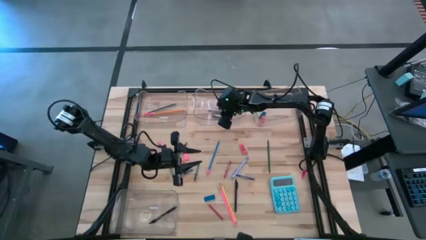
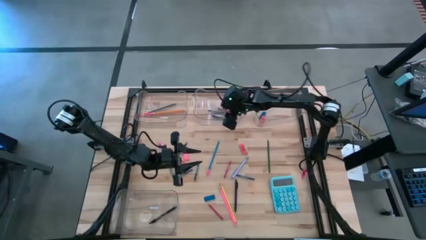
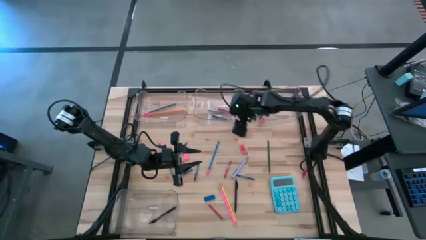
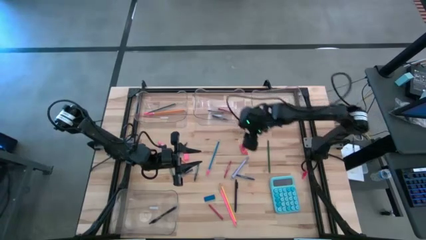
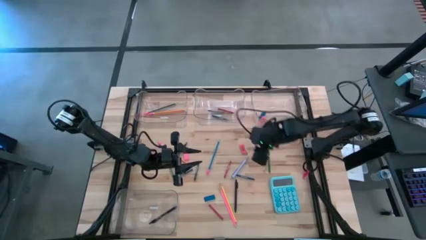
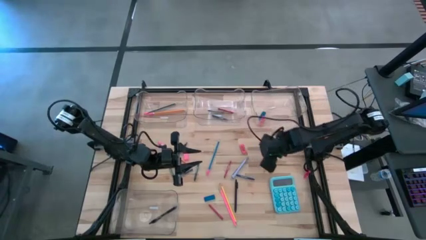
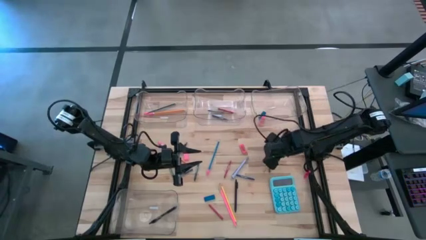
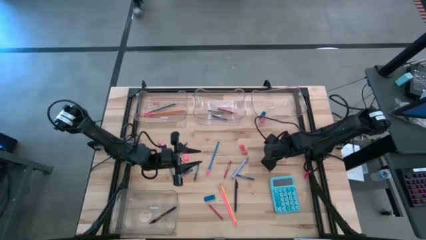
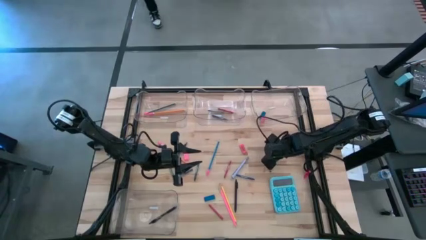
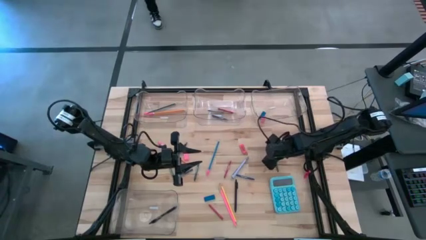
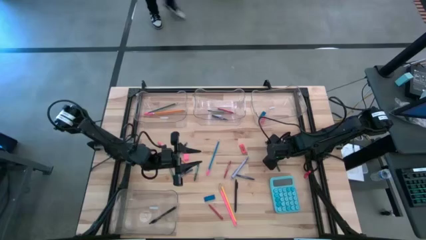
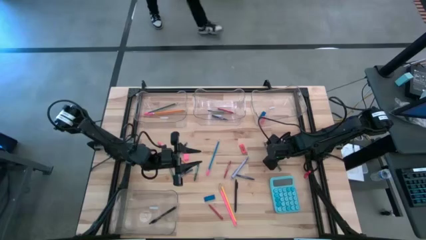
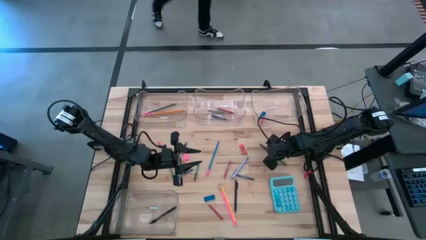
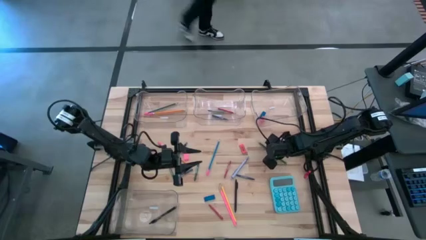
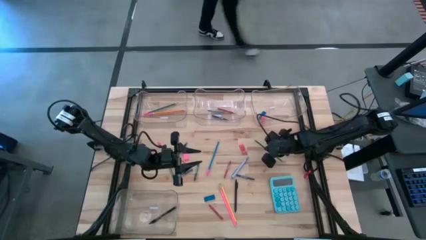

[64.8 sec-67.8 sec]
Task: Sort crayons/erasers/pens/pencils in bins
Put the green colored pencil into the top left transparent bin

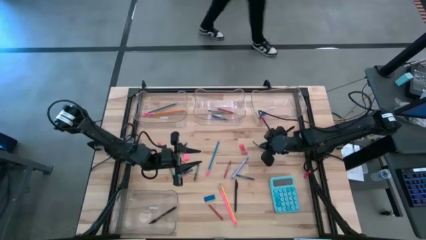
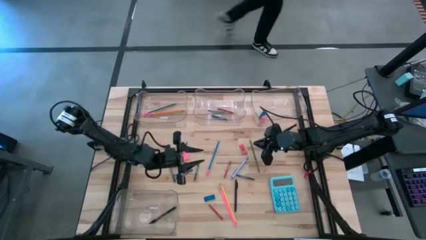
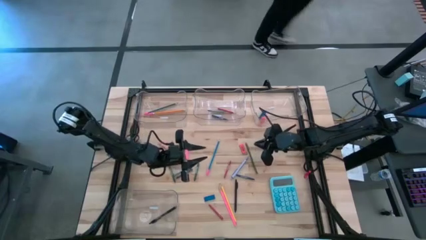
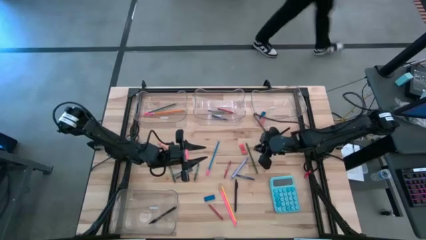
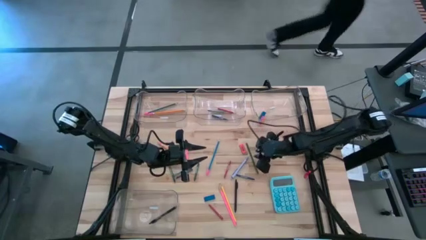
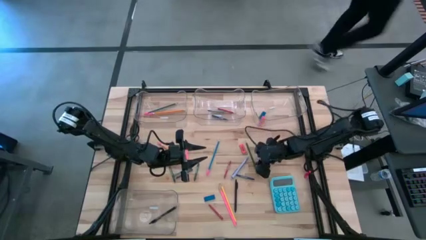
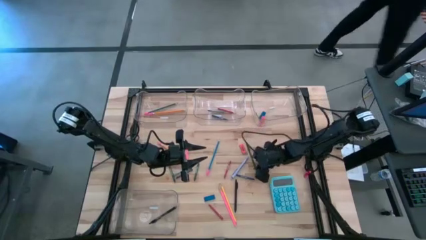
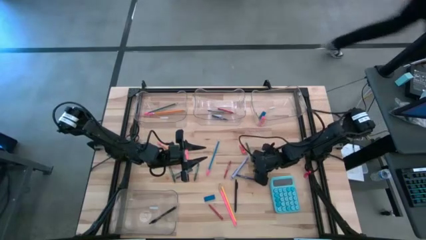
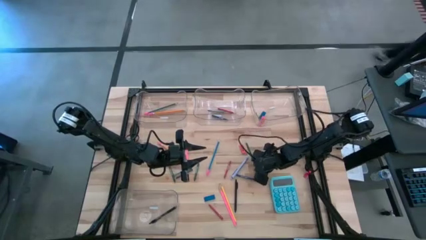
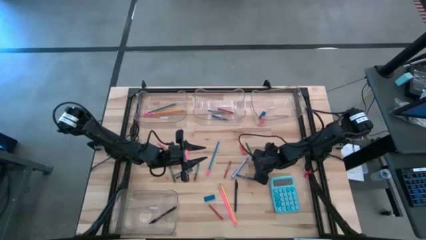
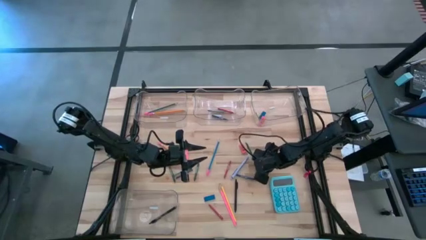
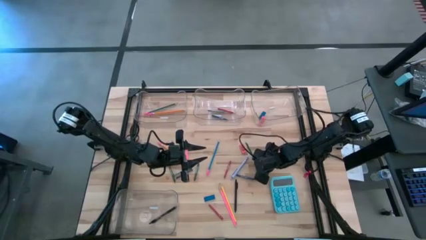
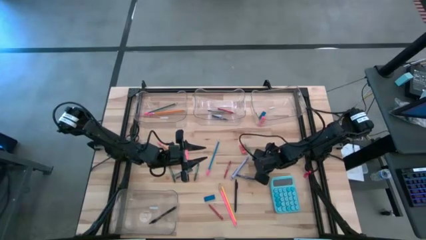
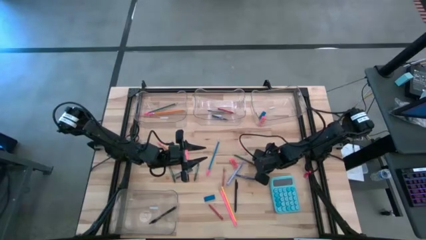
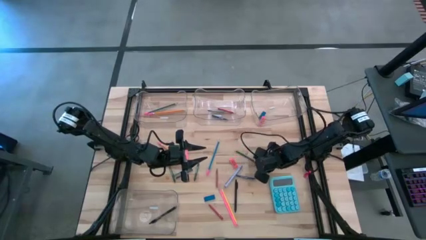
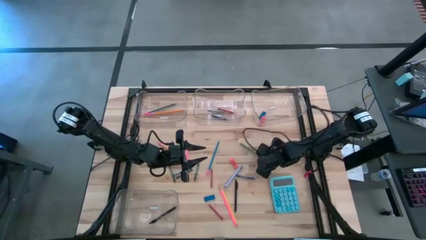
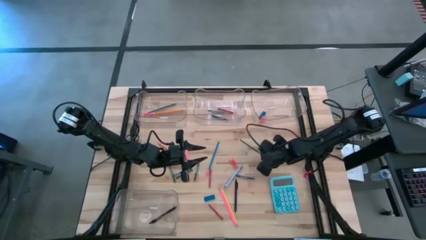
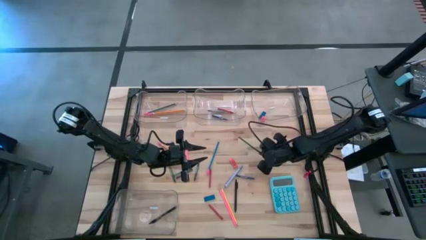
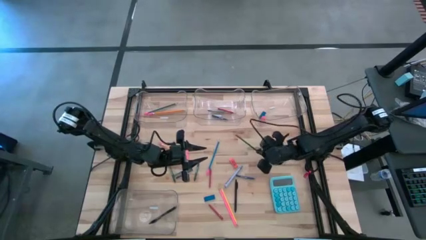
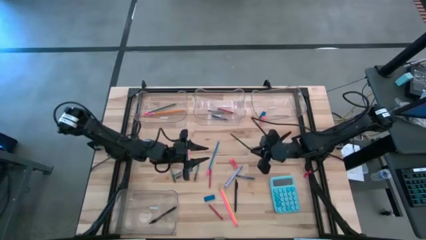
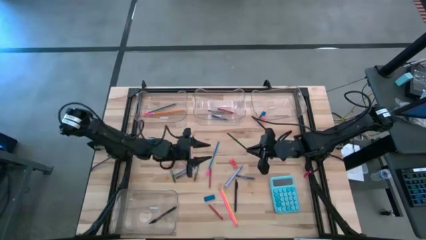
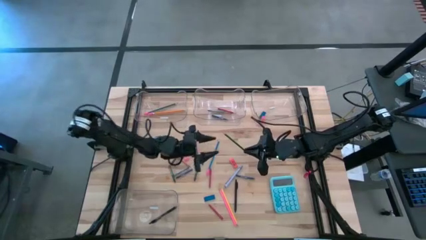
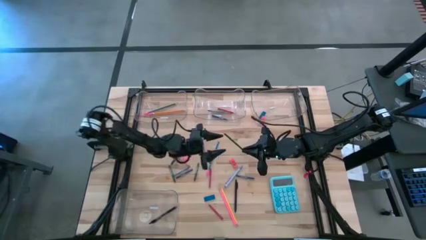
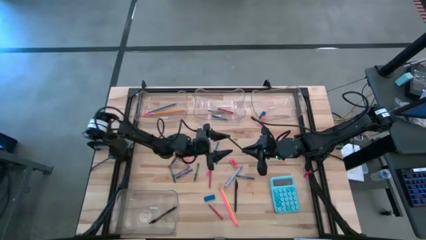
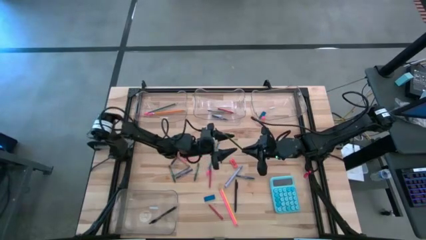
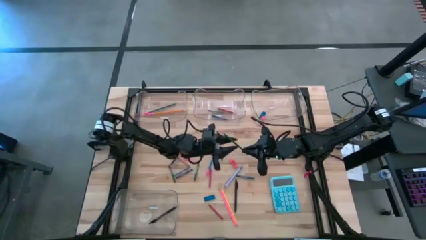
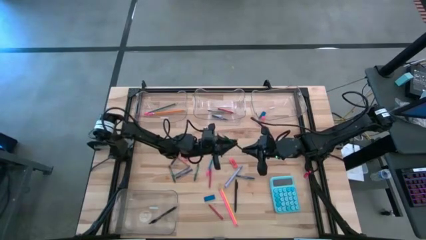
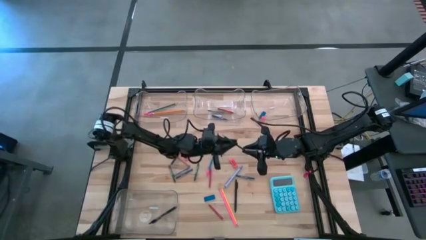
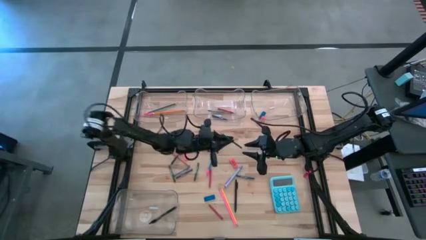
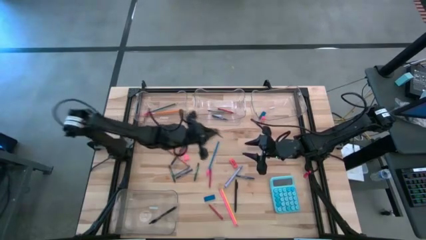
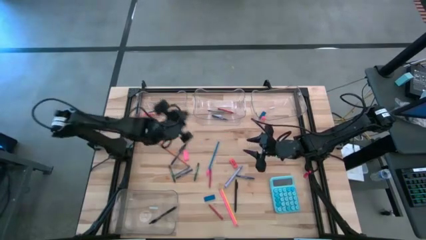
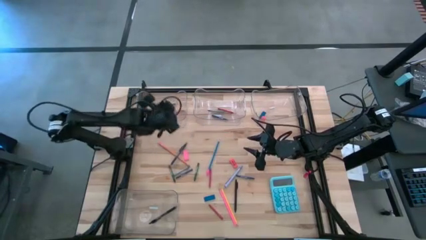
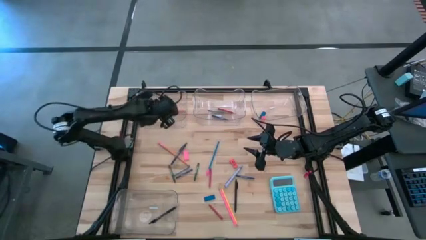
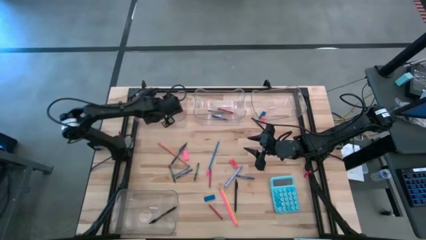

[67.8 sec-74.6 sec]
Put the green colored pencil into the top left transparent bin

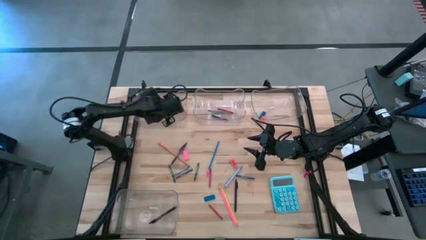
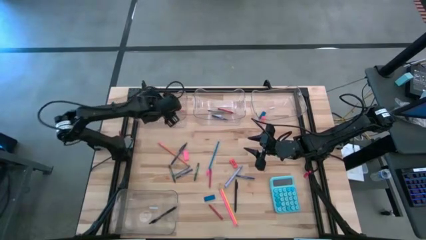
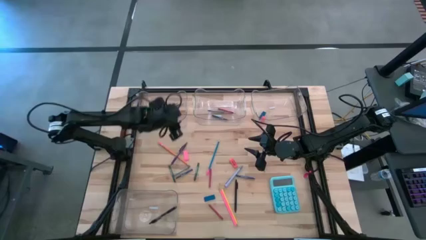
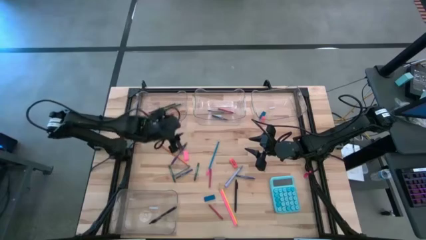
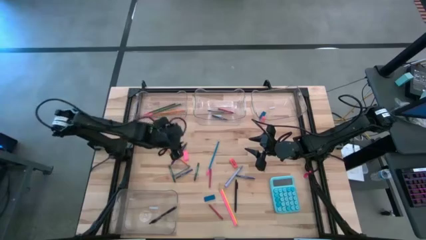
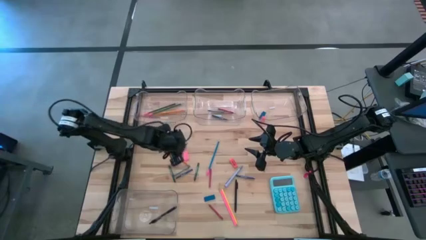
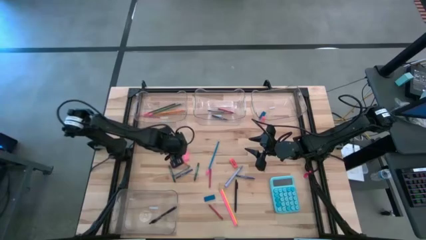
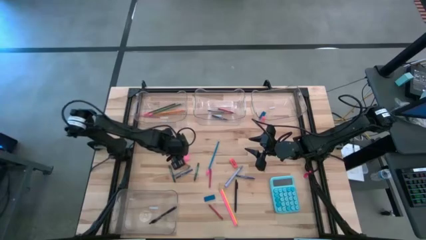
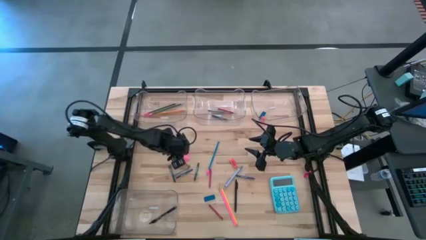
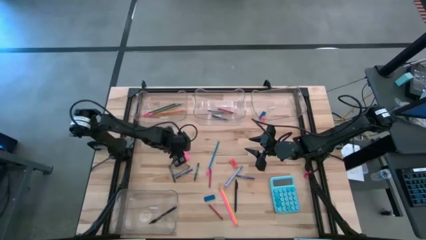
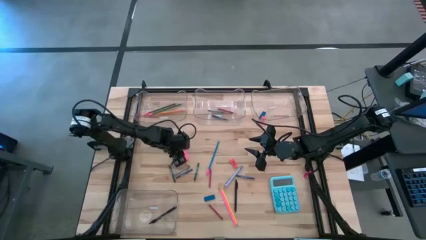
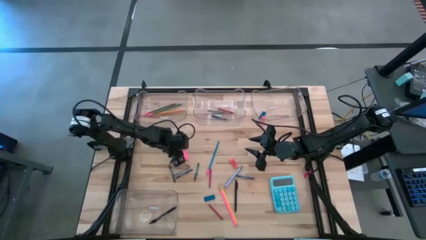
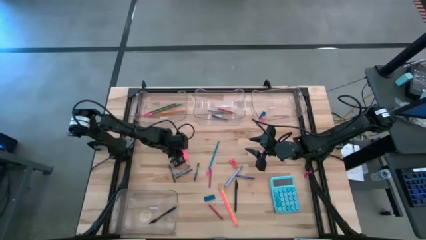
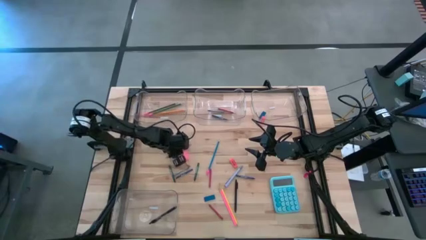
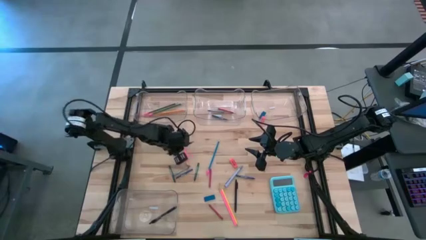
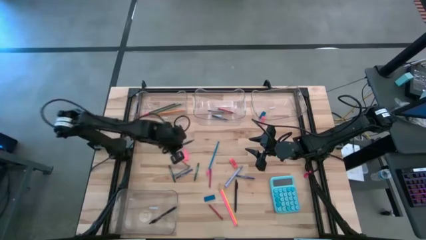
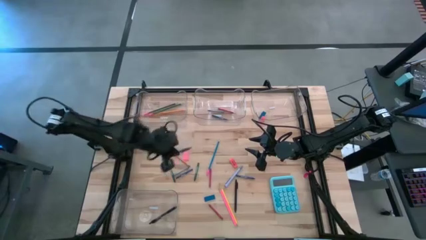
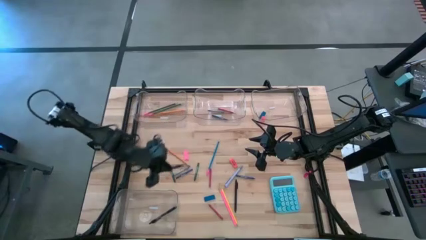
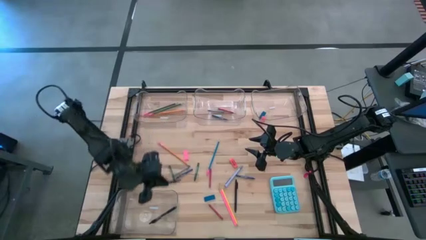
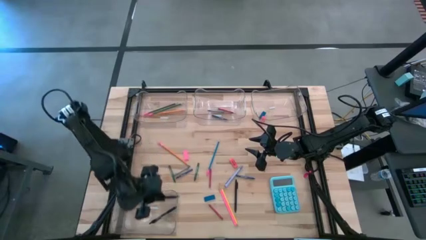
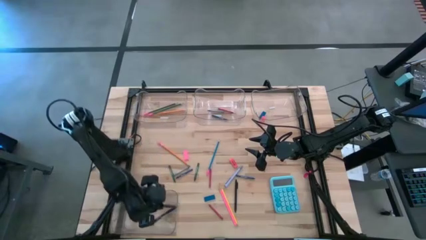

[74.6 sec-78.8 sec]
Put the violet pen into the bottom transparent bin

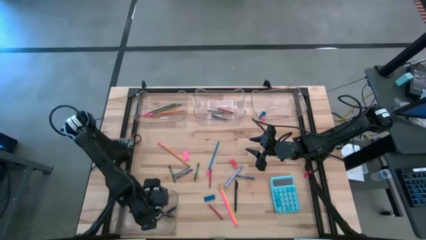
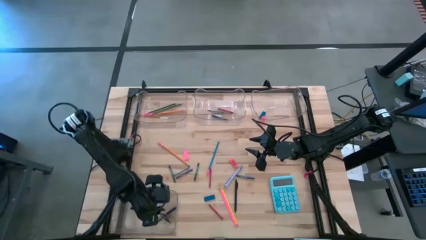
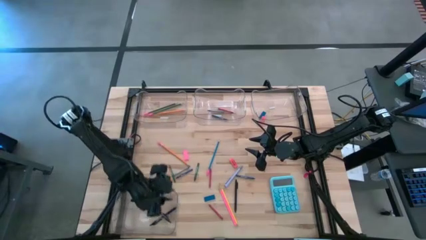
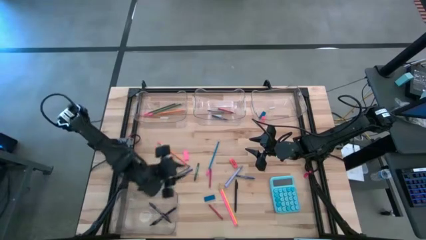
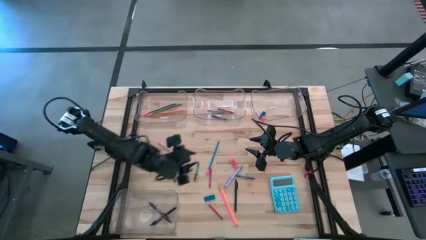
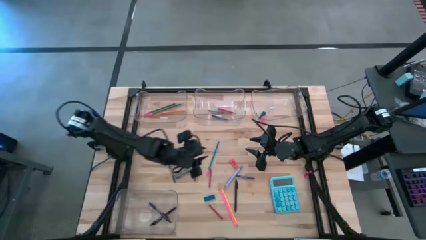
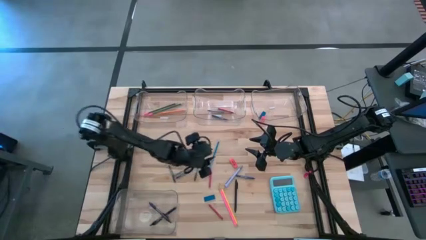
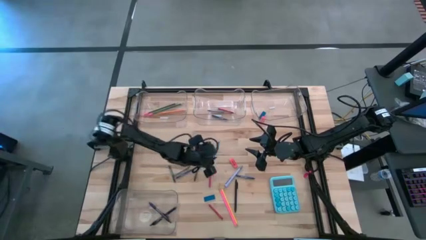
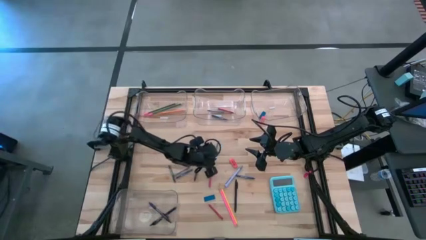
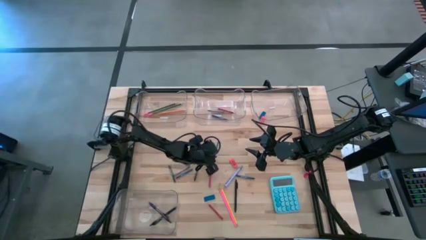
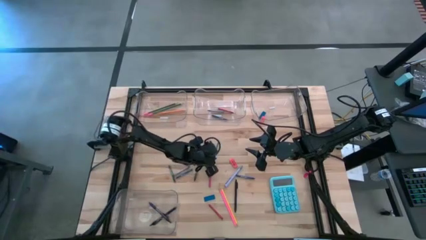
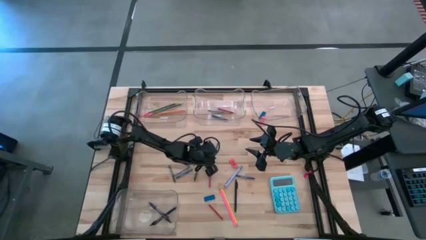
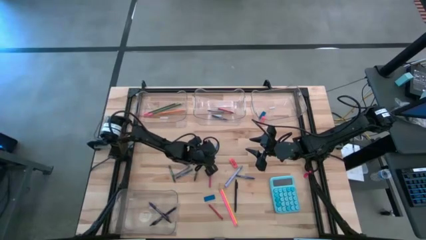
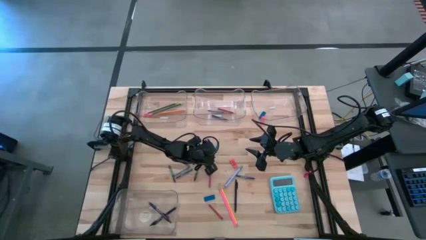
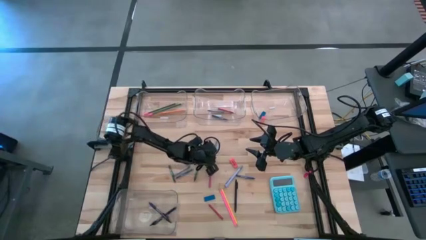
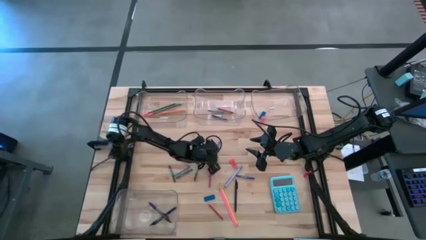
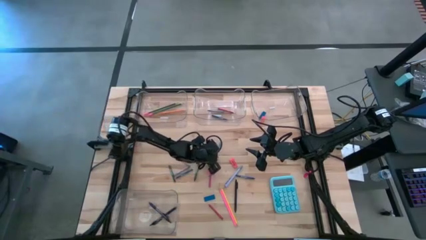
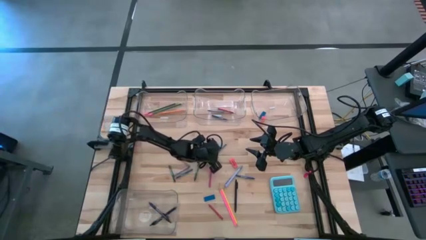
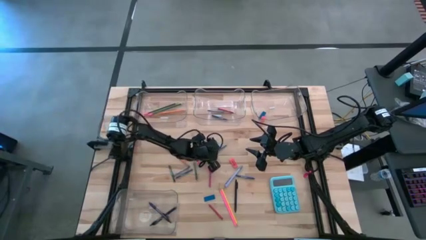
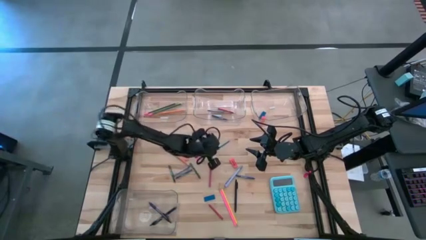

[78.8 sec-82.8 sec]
Put the blue colored pencil into the top left transparent bin
